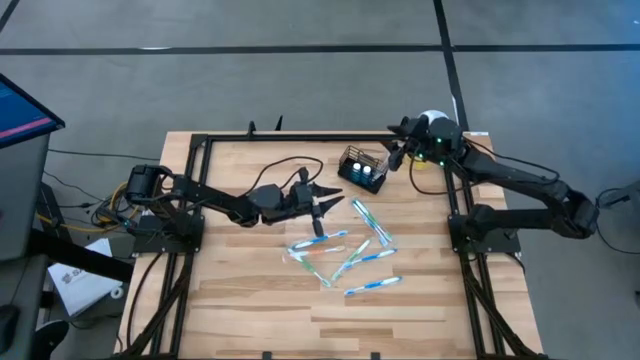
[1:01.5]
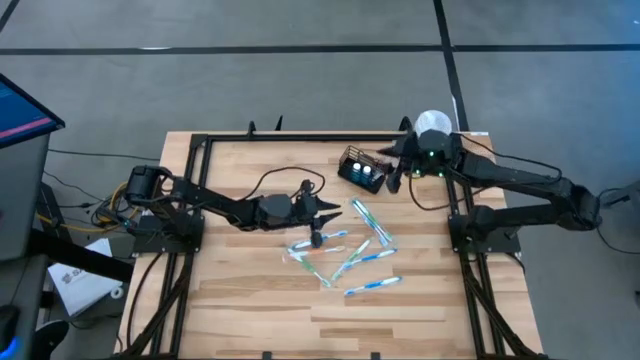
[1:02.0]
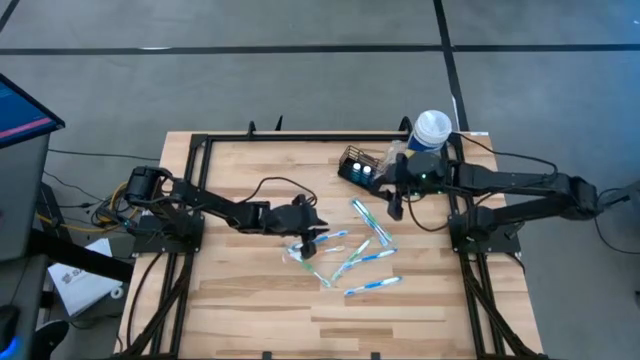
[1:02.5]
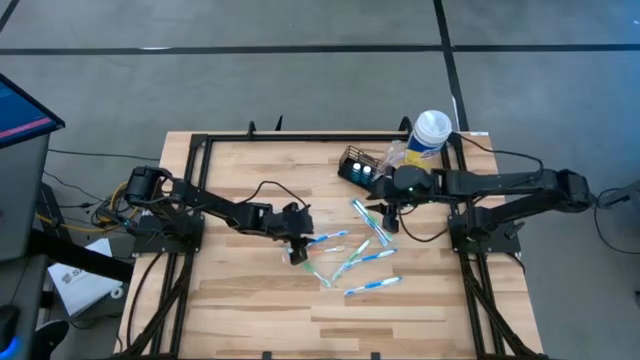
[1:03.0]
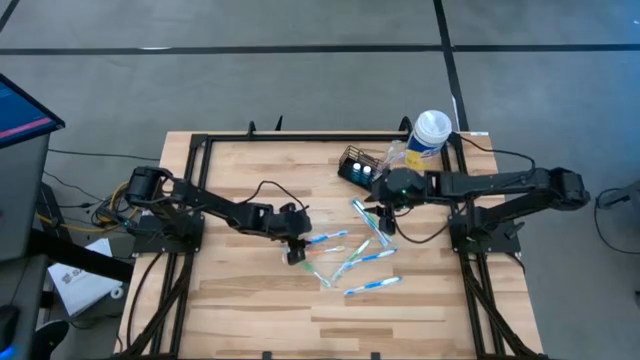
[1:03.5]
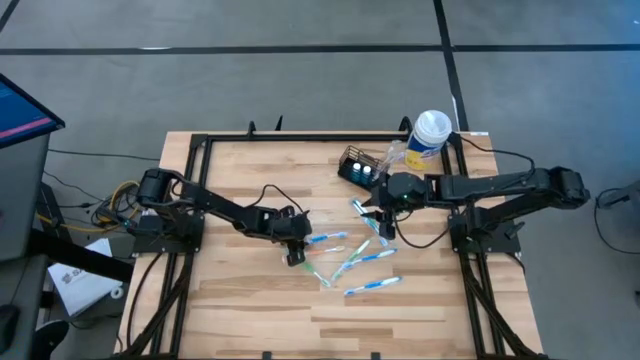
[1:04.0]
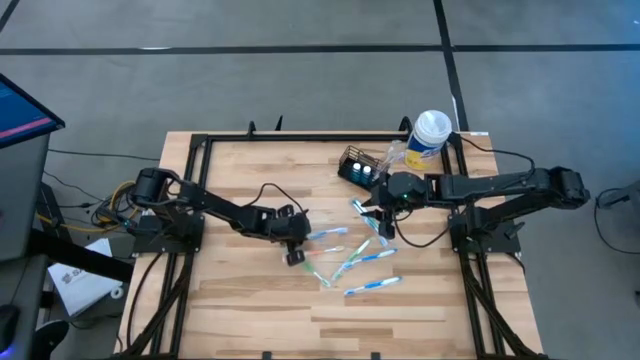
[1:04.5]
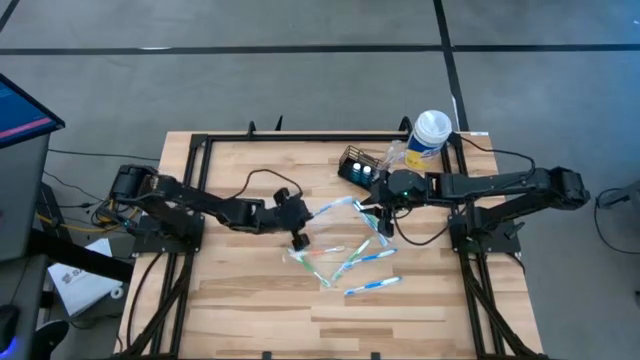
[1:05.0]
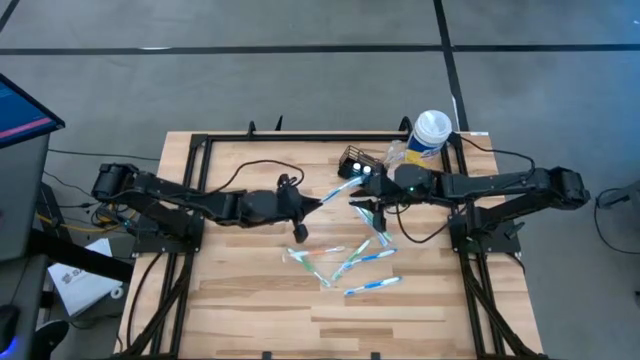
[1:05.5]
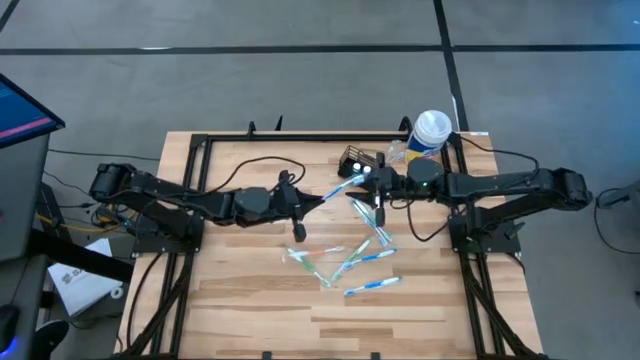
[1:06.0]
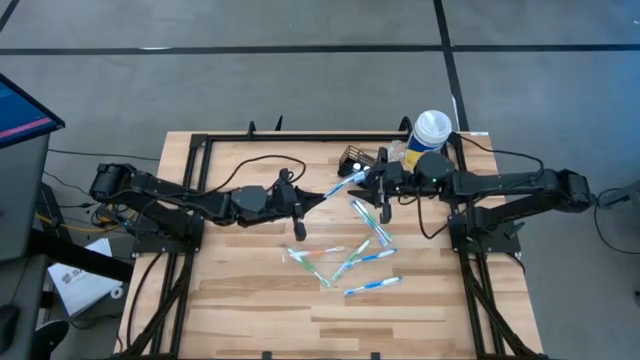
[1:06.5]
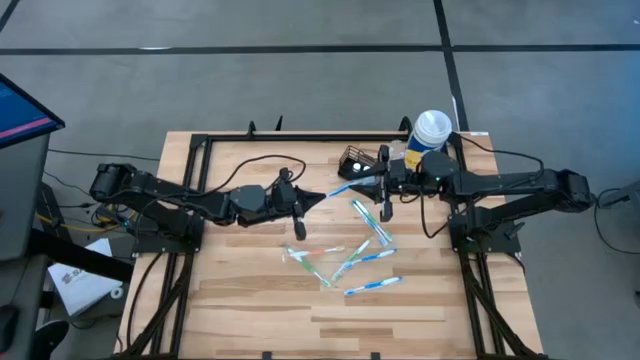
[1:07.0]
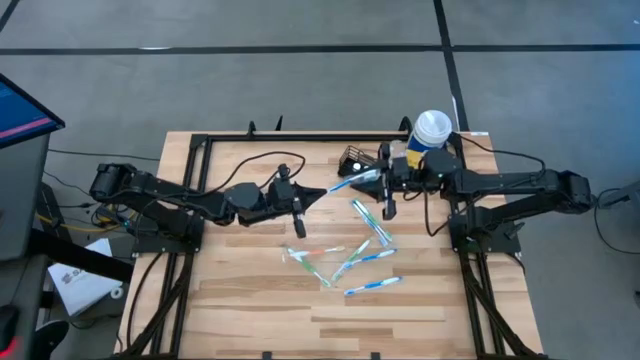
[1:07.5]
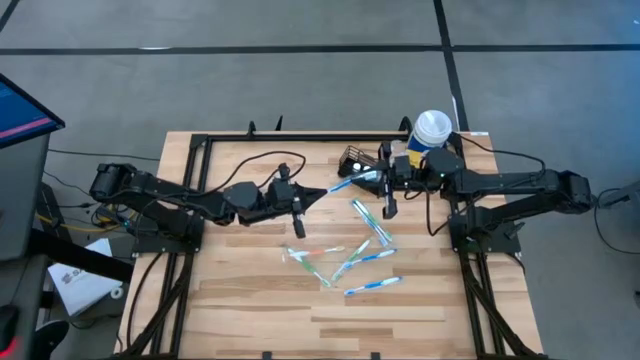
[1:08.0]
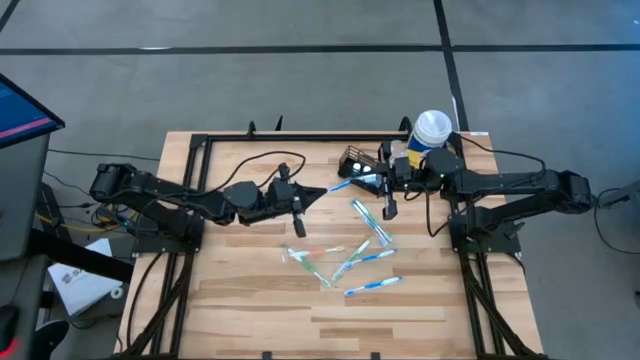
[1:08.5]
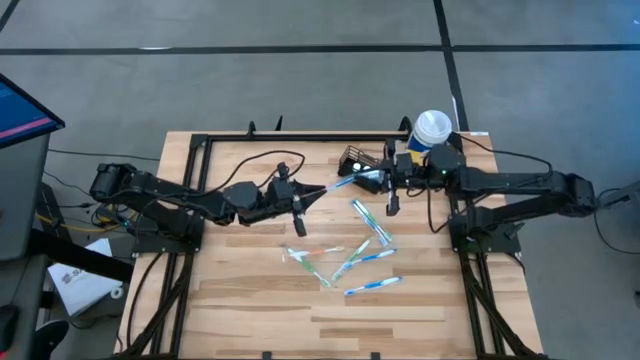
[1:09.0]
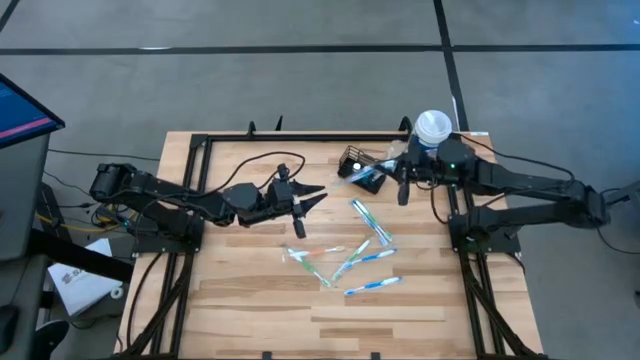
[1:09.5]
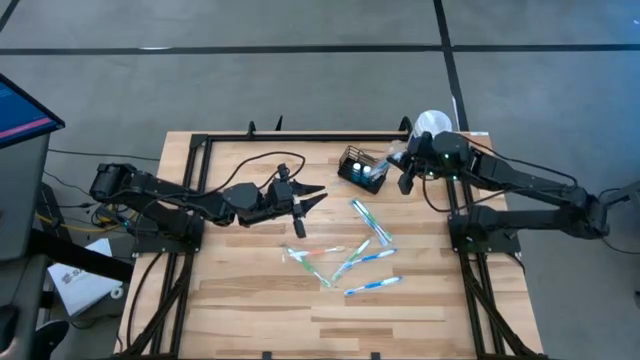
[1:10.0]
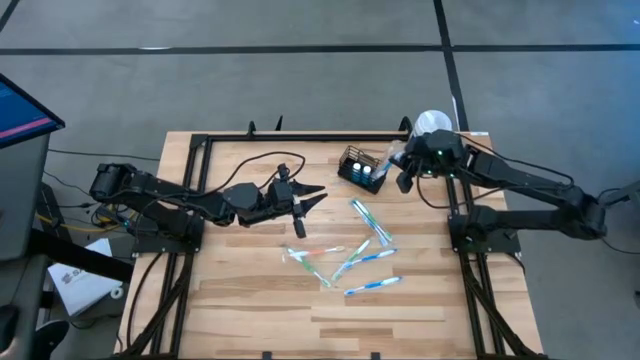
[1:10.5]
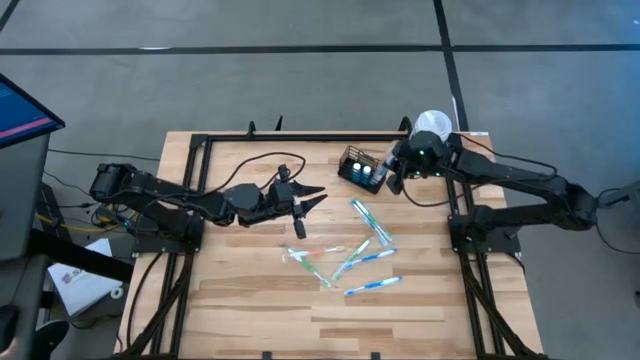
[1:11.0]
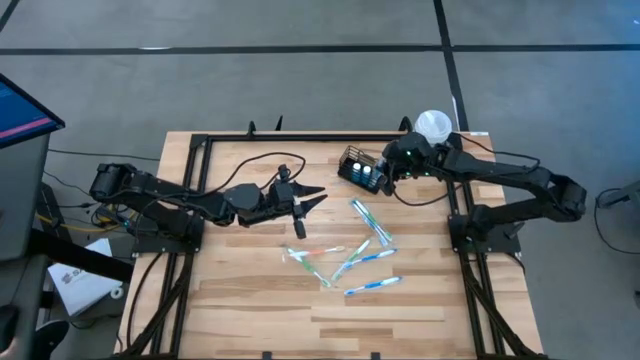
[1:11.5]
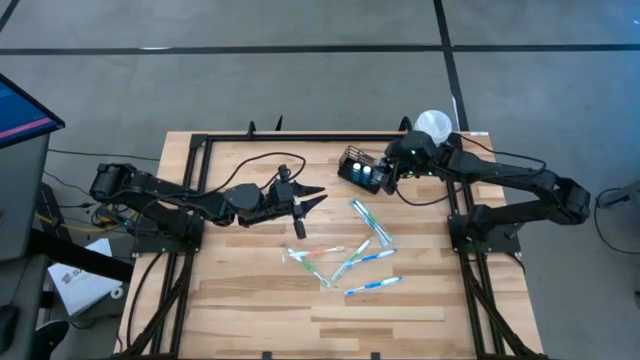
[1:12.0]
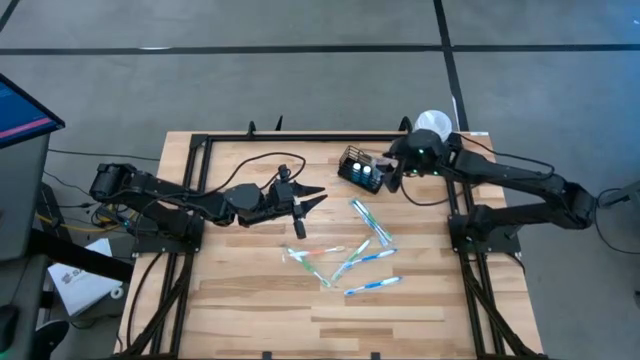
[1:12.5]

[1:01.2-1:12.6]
Task: Pick & Place toothbrushing station
Put the blue toothbrush into the mesh organizer

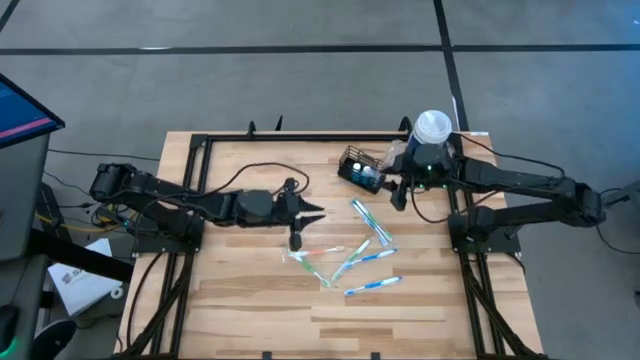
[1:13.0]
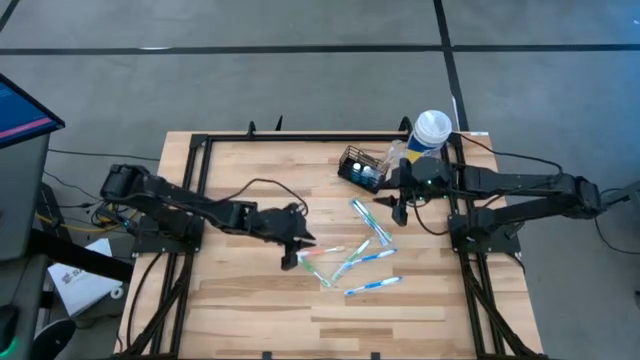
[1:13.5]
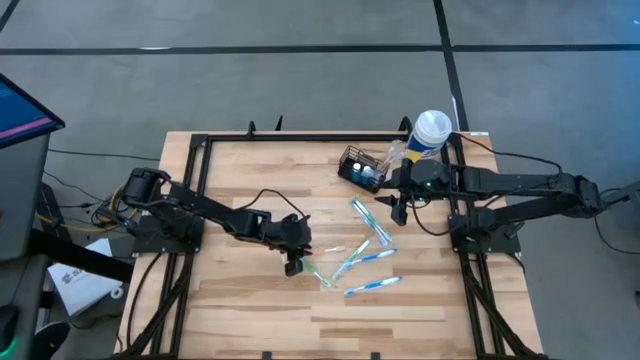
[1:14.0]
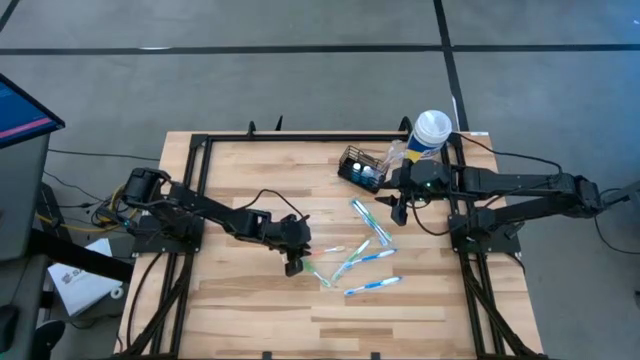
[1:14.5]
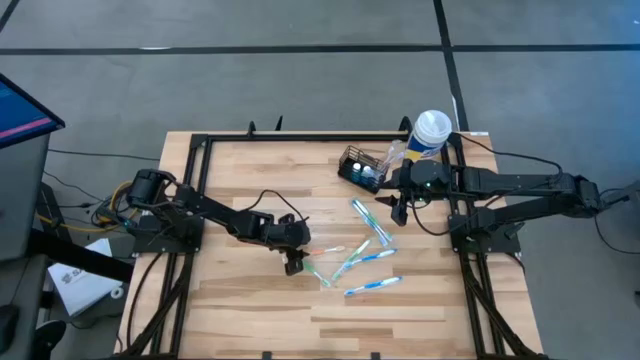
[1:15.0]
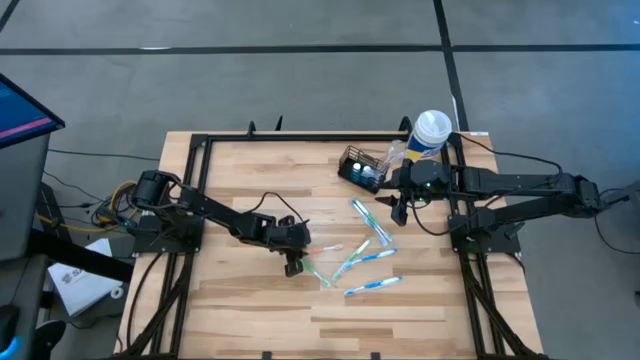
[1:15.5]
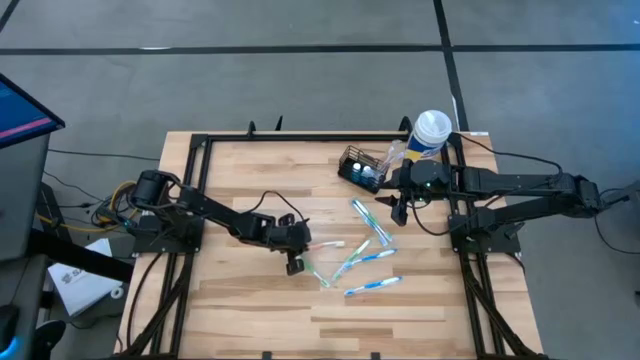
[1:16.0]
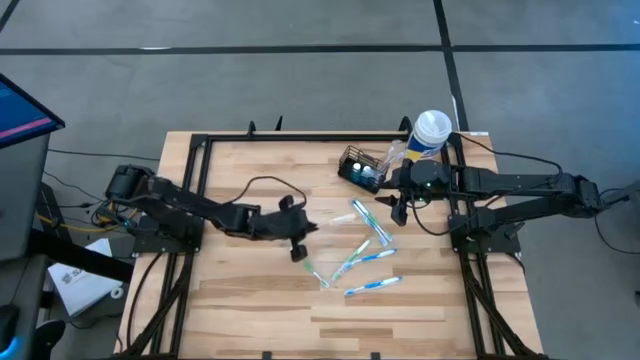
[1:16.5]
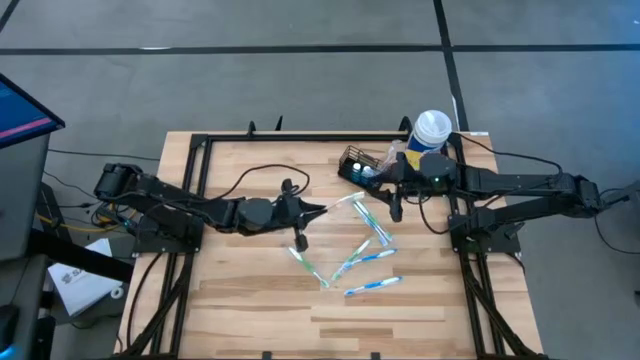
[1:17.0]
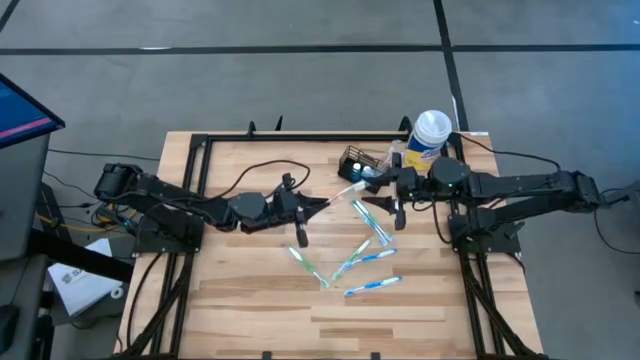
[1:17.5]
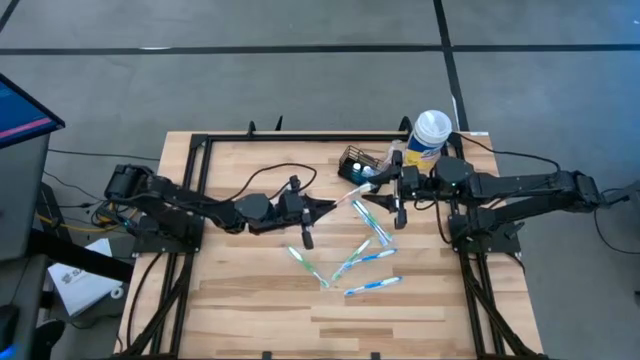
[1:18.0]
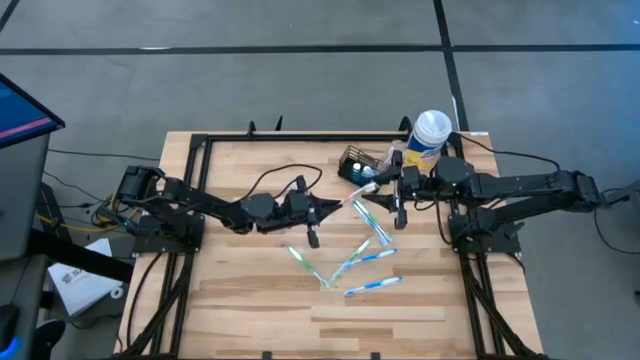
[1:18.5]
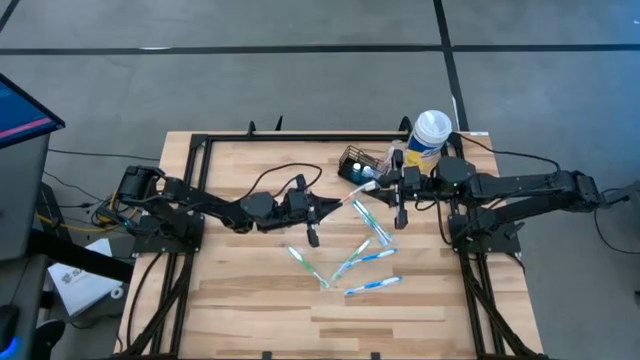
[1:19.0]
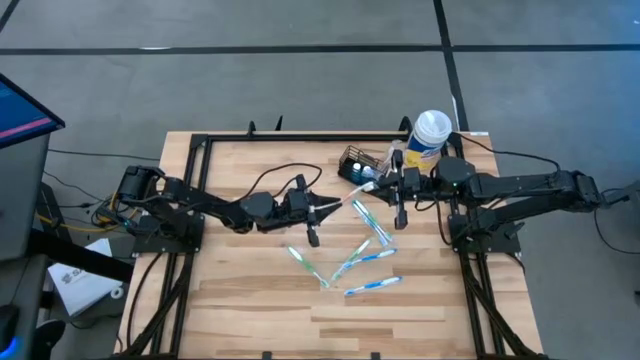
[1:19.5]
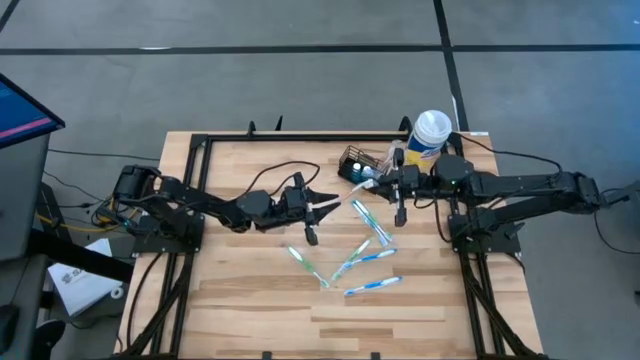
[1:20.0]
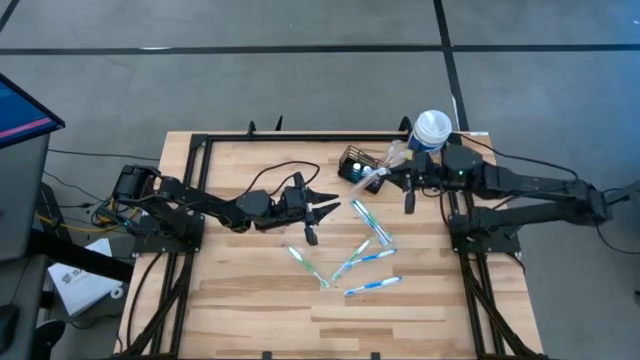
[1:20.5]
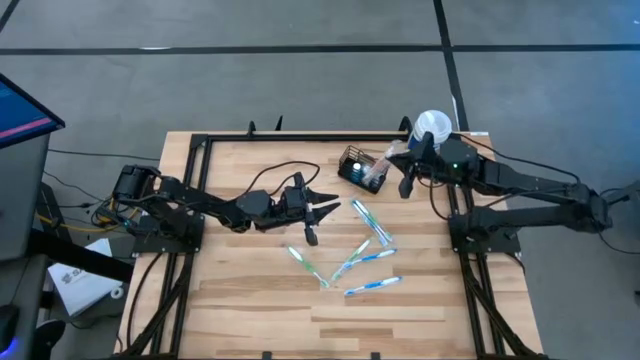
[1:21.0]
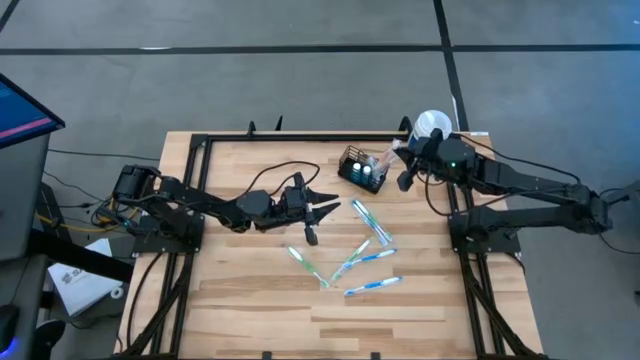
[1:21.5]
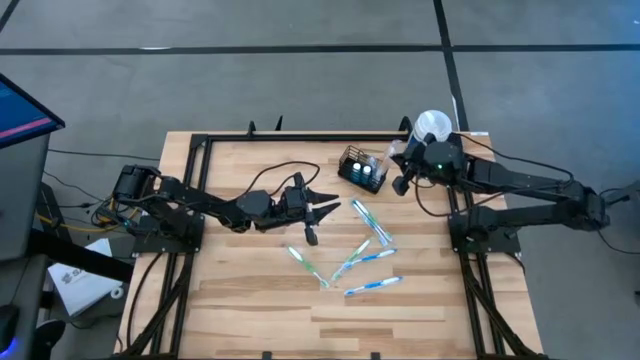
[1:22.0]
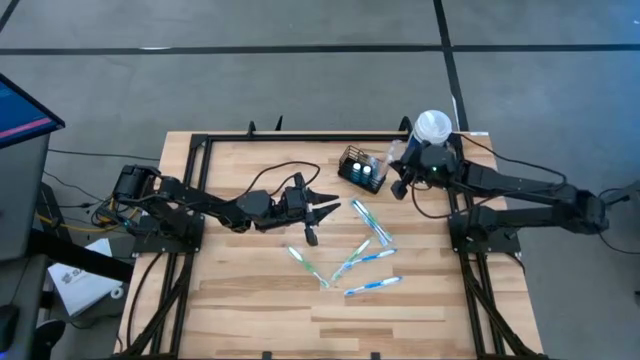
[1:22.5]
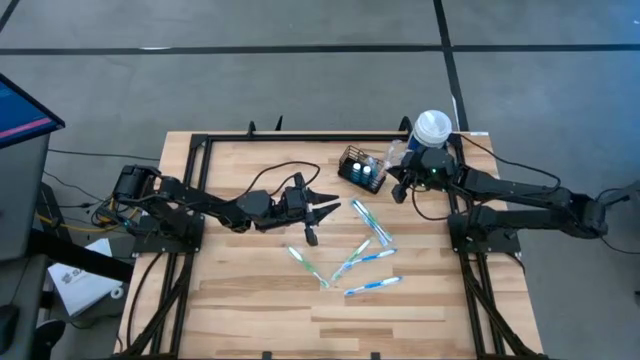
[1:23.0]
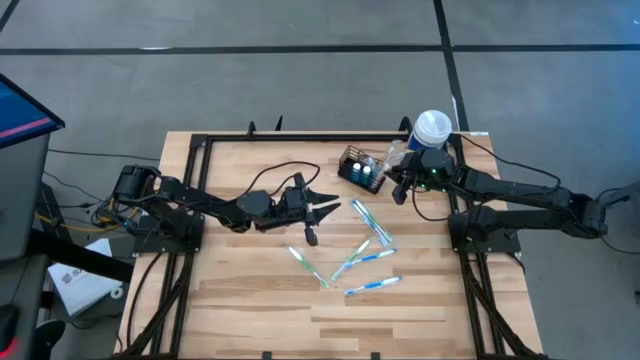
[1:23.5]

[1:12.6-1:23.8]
Put the orange toothbrush into the mesh organizer
